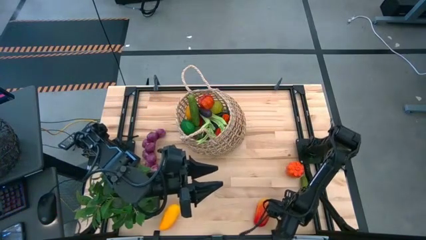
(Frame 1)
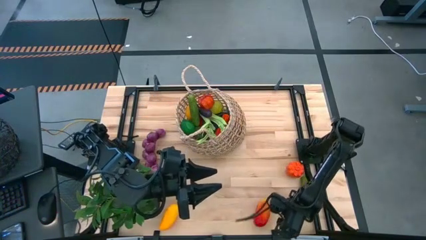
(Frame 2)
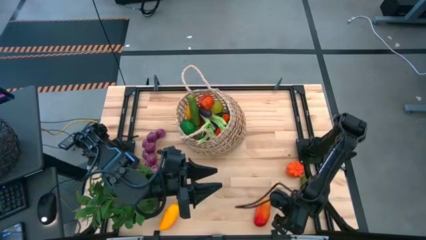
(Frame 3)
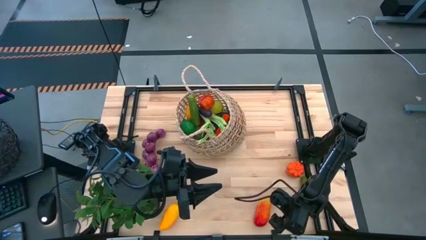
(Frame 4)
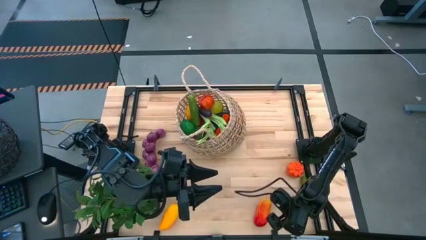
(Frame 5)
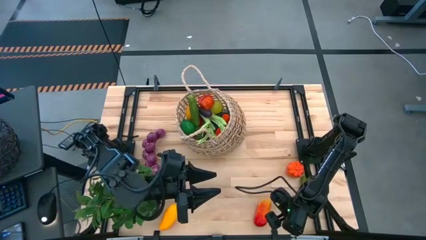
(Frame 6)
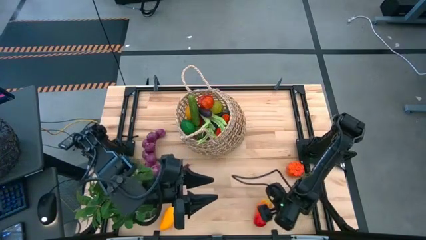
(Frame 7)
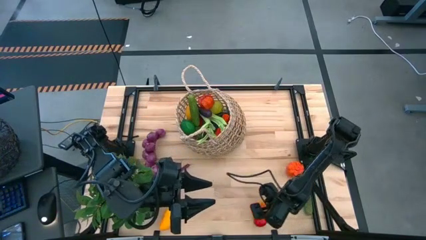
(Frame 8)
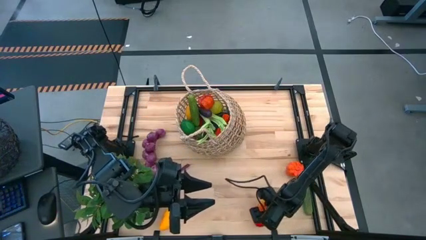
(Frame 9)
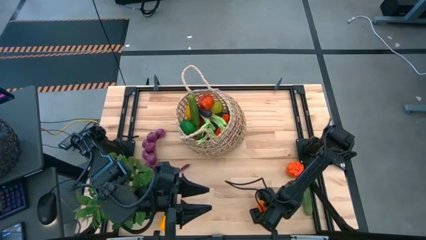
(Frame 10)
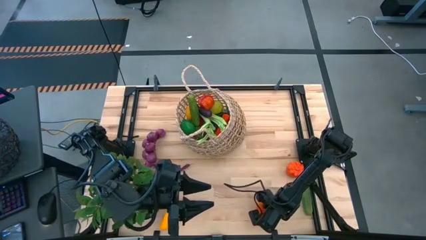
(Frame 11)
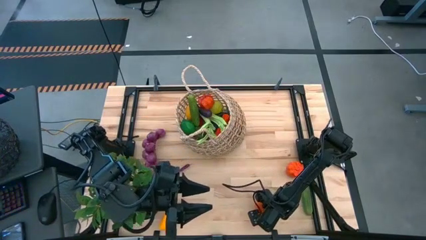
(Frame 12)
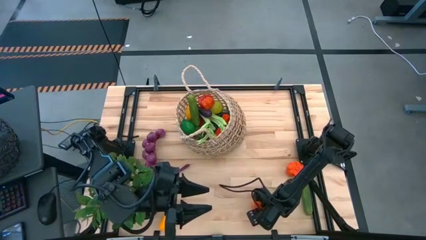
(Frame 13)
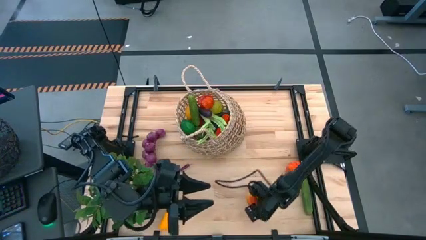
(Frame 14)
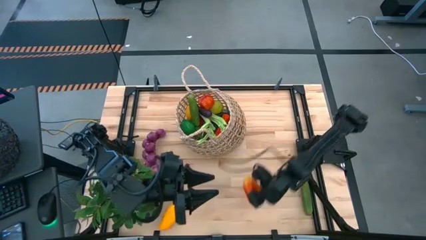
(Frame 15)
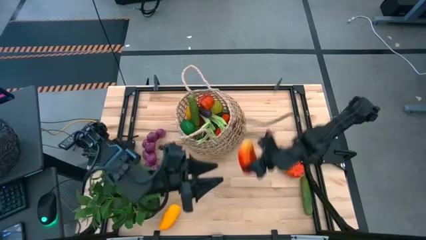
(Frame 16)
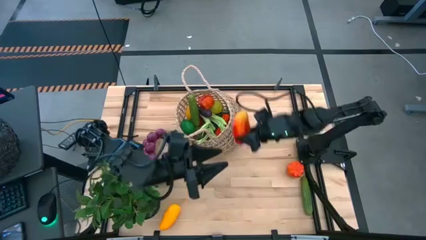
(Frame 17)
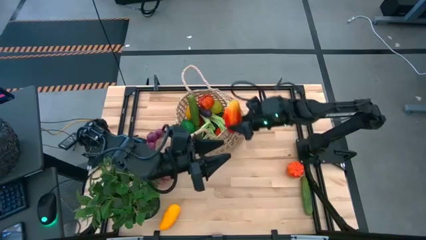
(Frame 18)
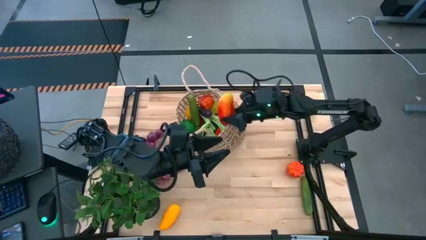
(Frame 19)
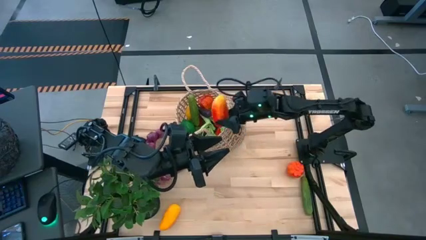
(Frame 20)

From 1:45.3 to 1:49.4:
Task: Build produce basket
Put the orange mango into the brown basket

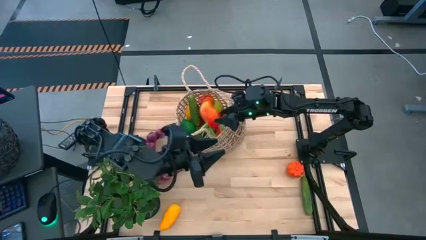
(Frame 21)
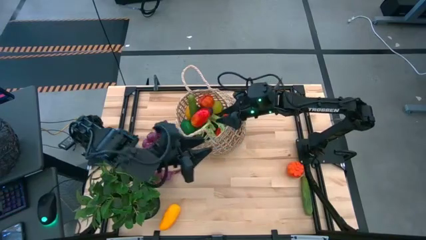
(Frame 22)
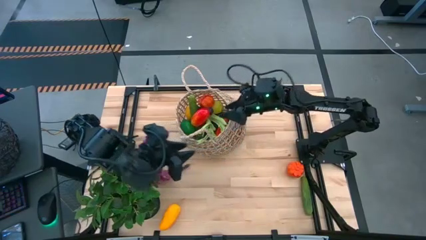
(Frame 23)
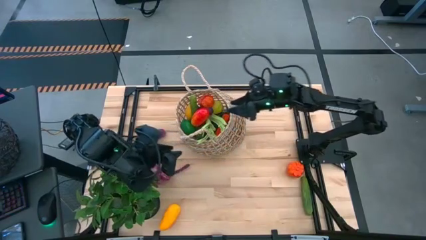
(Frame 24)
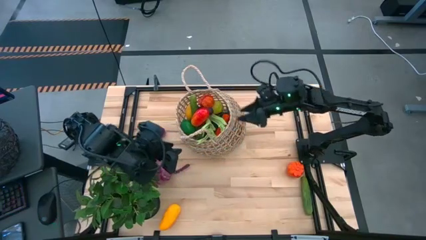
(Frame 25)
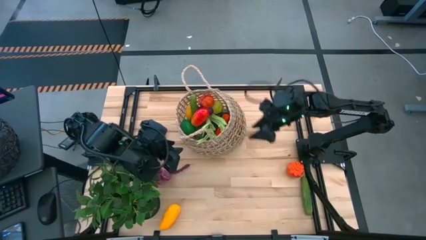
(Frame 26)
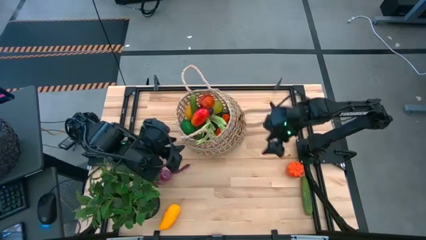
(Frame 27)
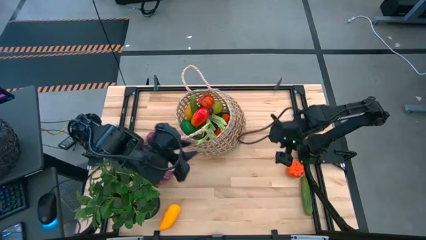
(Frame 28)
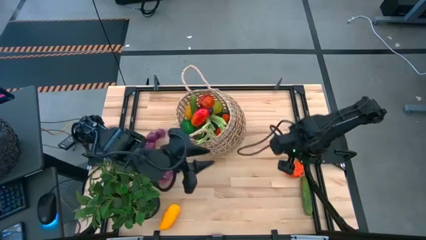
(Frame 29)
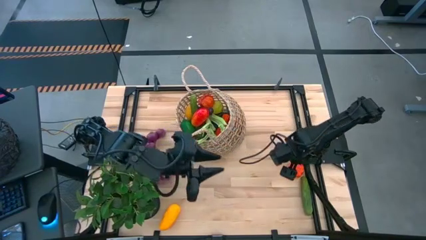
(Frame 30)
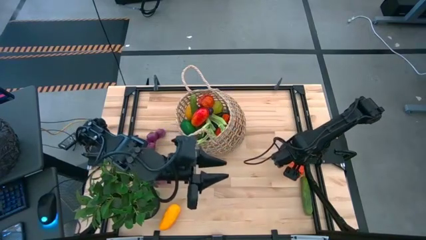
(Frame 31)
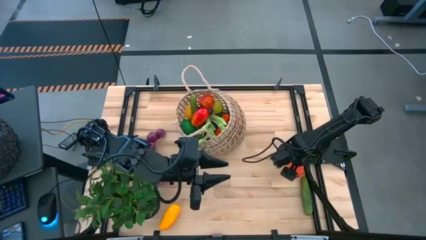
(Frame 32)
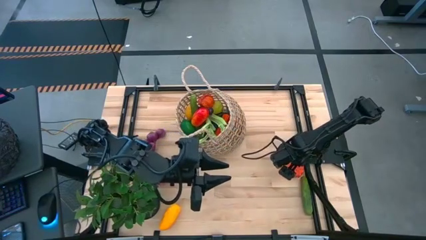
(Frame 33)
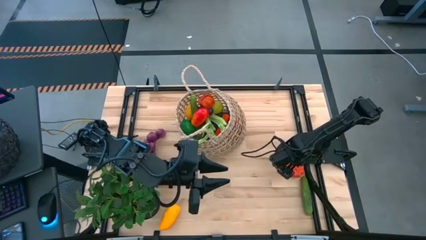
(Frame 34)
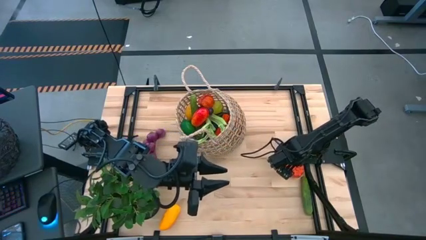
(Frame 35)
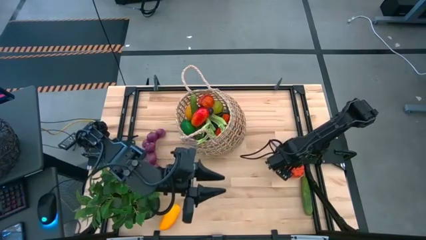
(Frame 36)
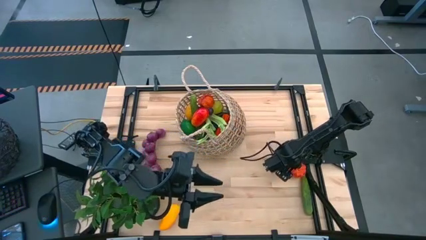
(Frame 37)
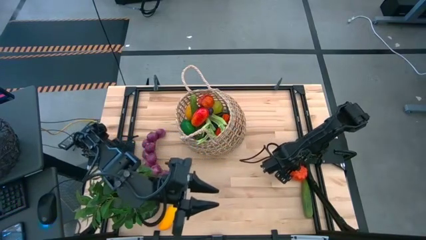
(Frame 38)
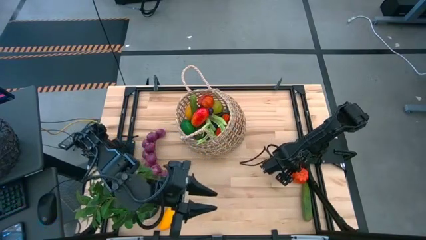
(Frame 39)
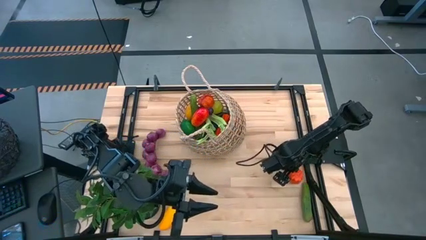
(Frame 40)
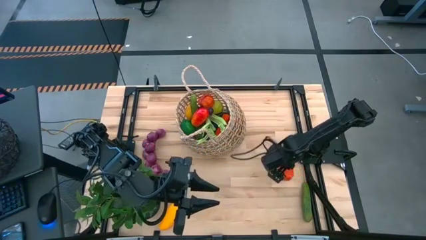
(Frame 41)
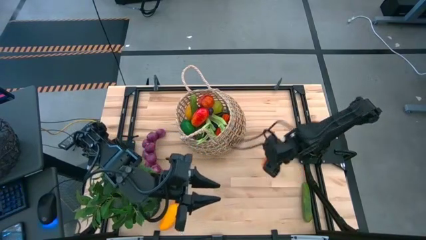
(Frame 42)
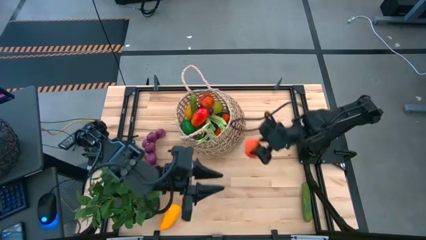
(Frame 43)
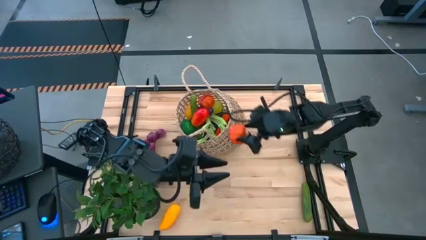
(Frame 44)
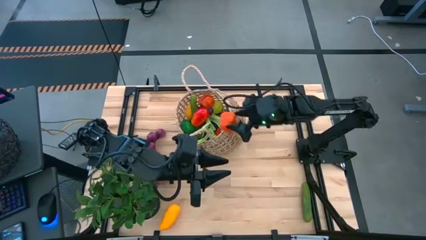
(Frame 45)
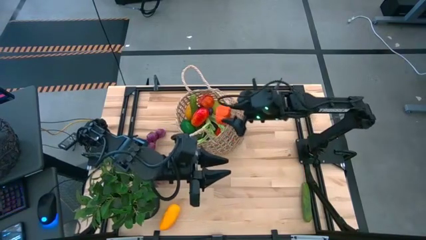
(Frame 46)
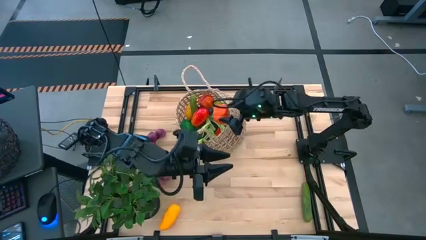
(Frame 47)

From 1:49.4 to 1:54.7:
Put the pumpkin into the brown basket

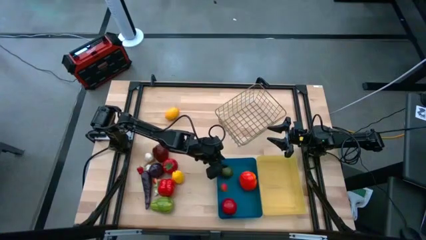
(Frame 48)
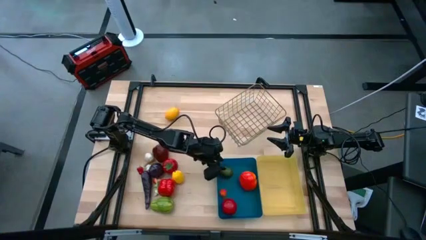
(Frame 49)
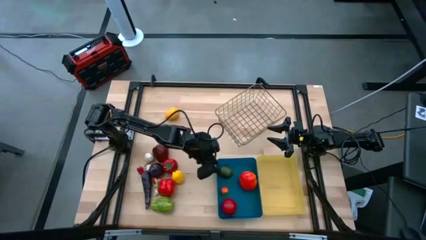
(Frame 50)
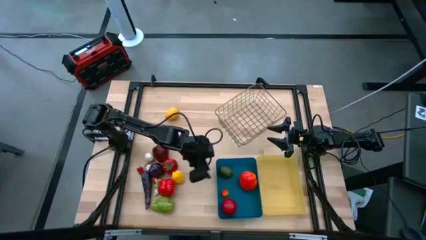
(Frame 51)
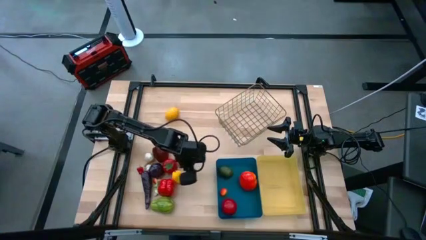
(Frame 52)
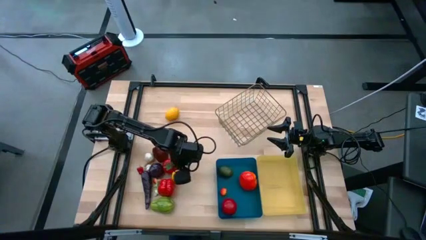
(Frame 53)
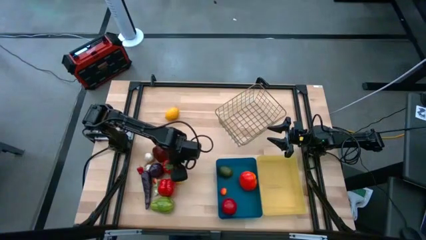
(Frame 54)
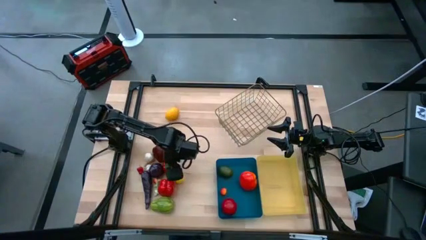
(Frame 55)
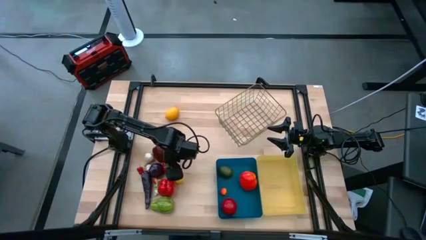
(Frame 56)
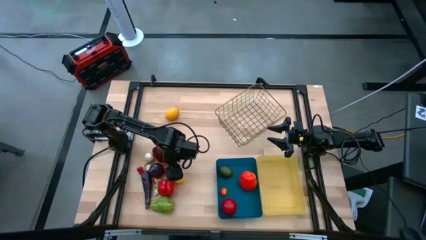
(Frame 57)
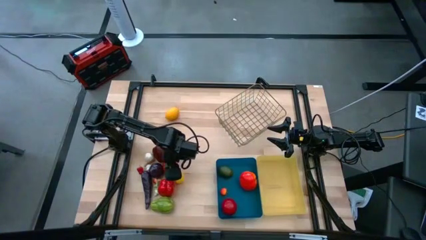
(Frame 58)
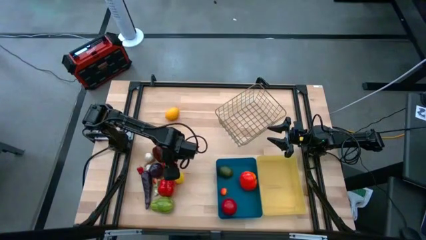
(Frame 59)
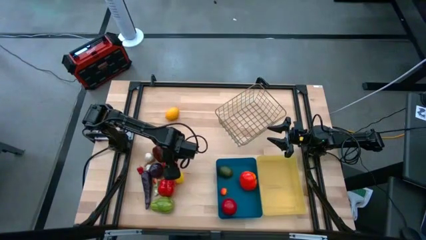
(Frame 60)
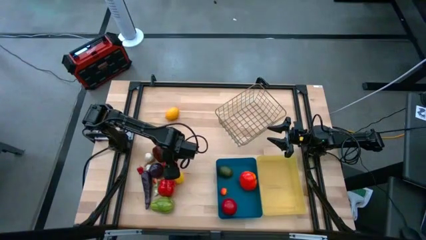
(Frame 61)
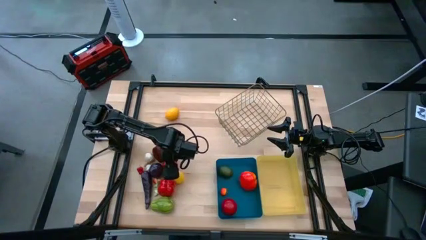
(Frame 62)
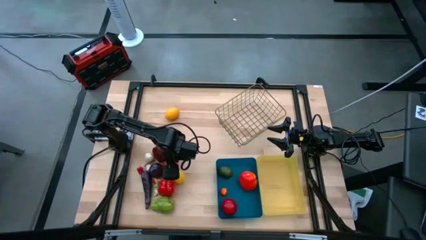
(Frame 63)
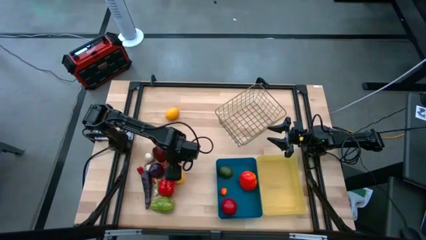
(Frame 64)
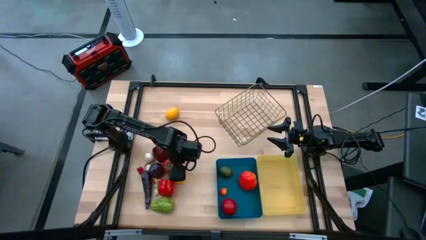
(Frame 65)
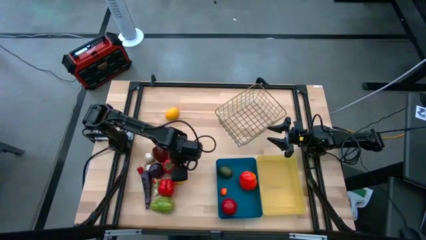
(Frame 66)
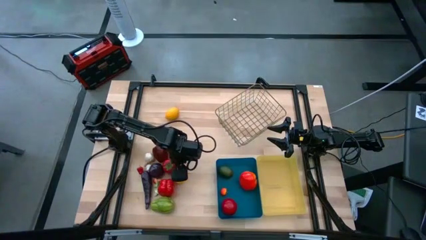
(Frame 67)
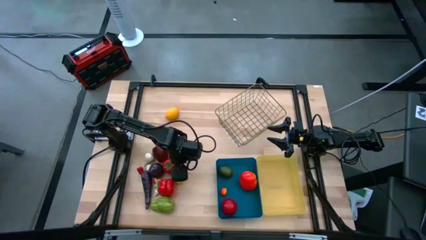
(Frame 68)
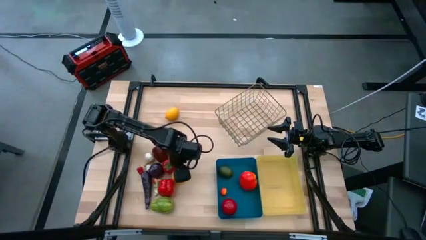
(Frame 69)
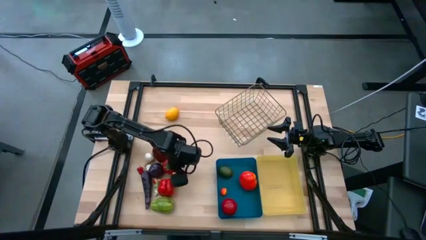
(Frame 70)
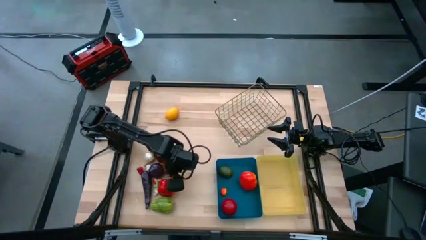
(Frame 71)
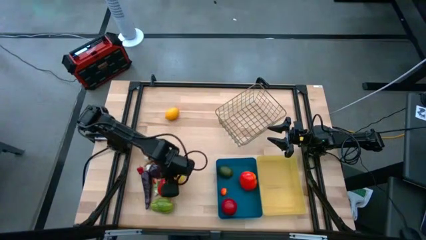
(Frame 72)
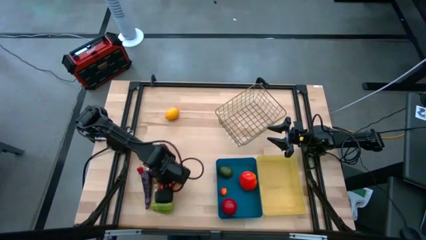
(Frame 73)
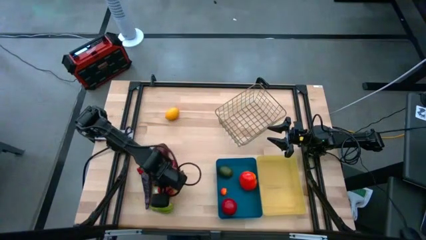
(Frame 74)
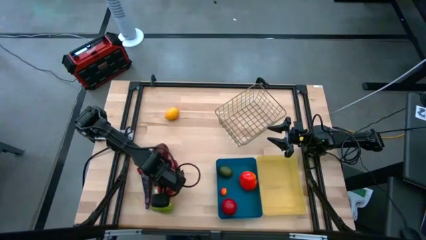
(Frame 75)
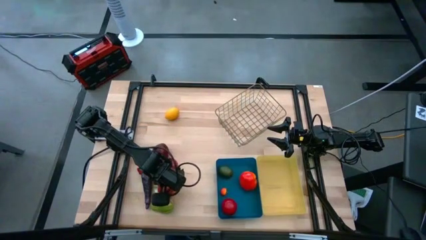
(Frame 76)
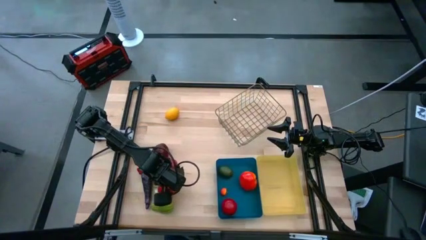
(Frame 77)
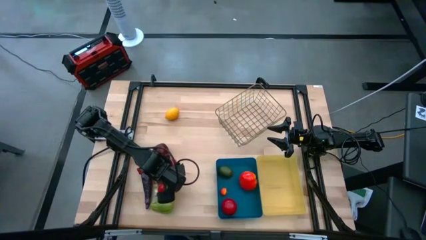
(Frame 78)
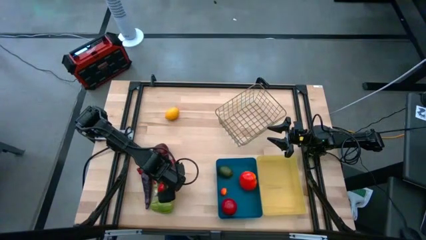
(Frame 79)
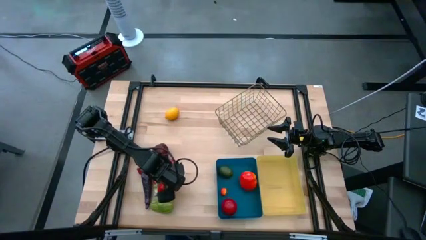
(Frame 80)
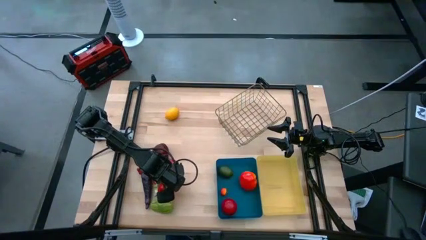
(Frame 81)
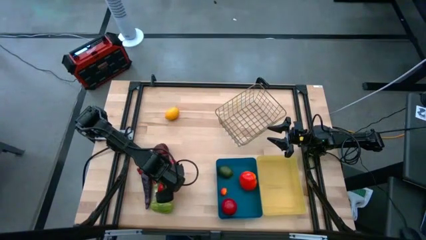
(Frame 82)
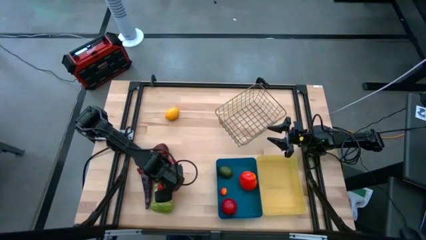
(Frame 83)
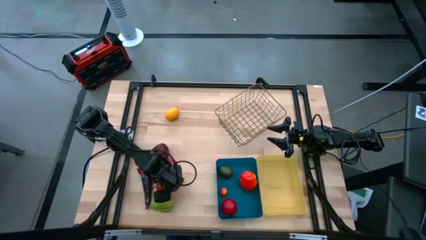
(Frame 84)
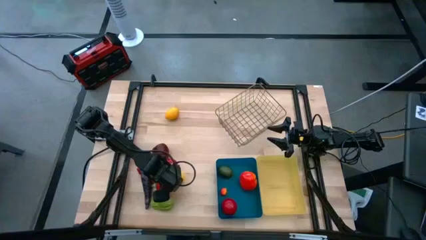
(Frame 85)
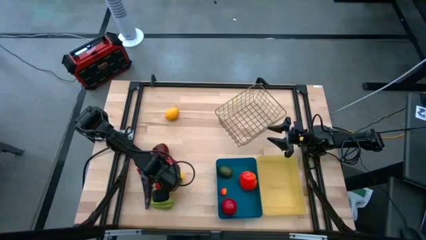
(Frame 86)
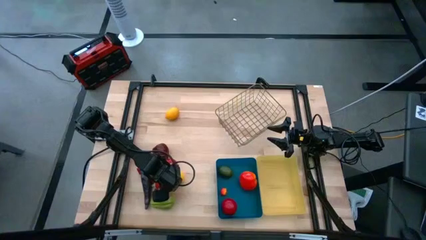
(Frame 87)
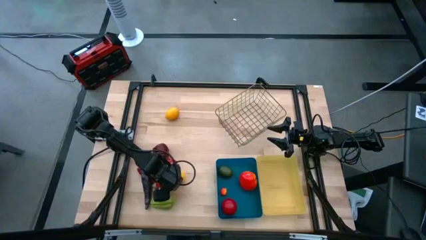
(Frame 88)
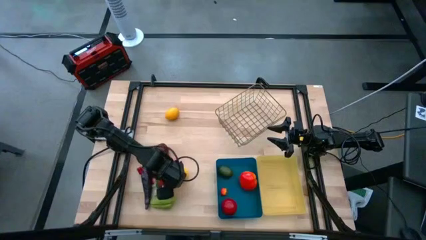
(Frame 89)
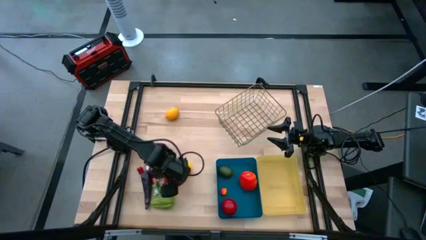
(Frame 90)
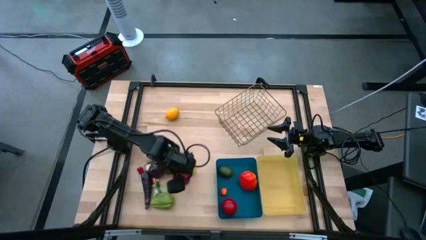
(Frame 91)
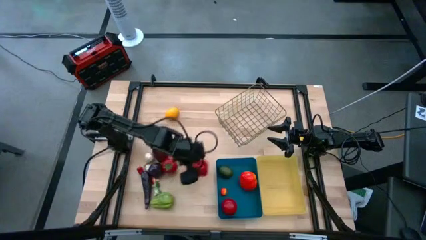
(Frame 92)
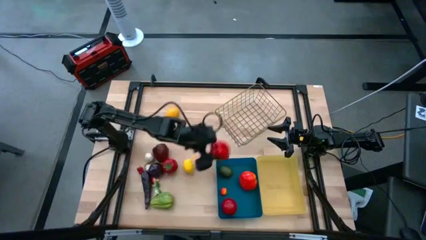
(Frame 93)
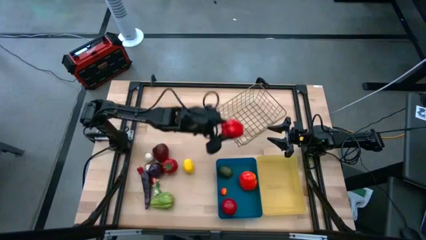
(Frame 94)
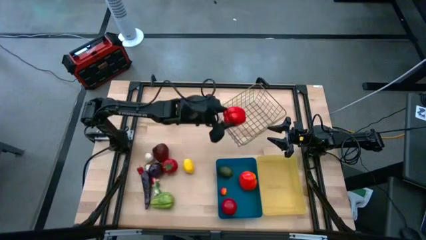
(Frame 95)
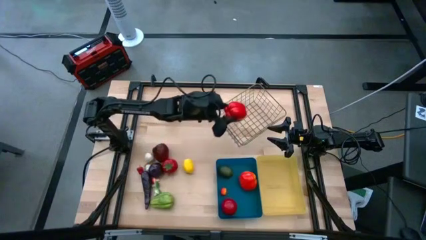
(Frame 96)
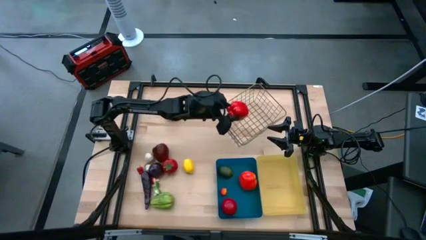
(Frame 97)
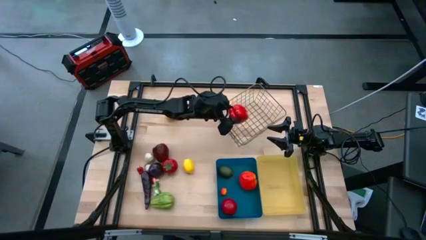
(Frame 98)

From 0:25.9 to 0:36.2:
Task: Sort produce into baskets
Put the red bell pepper into the brown wire basket
